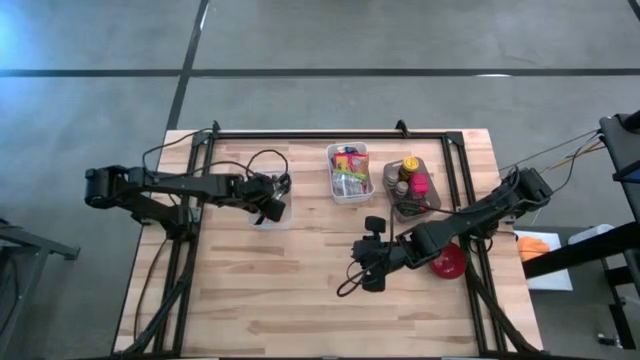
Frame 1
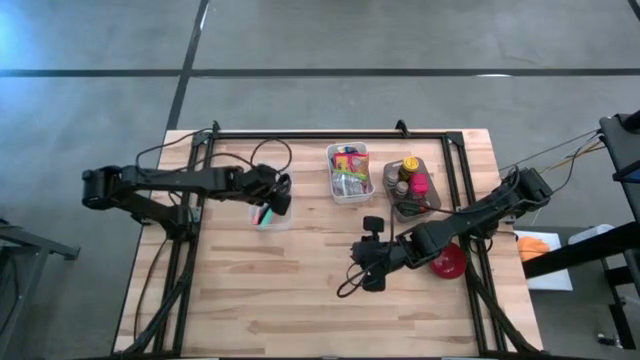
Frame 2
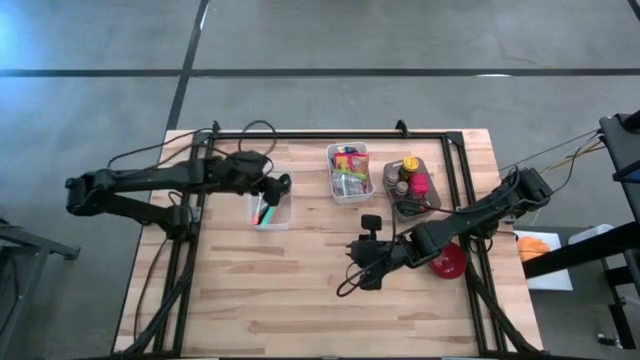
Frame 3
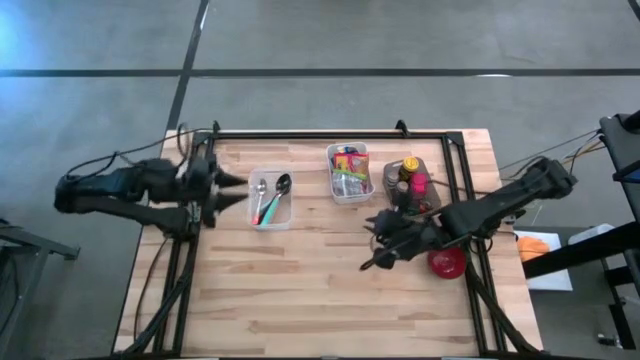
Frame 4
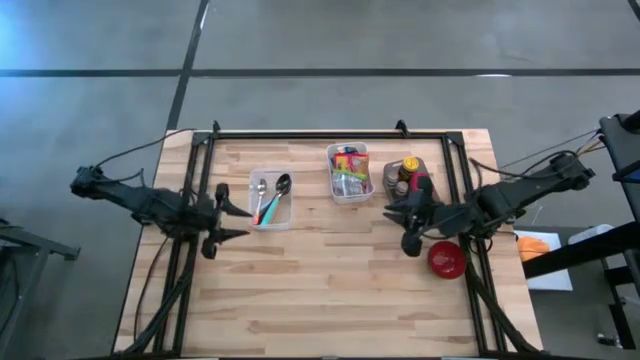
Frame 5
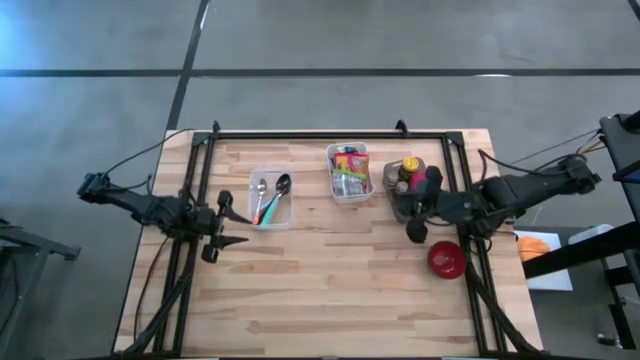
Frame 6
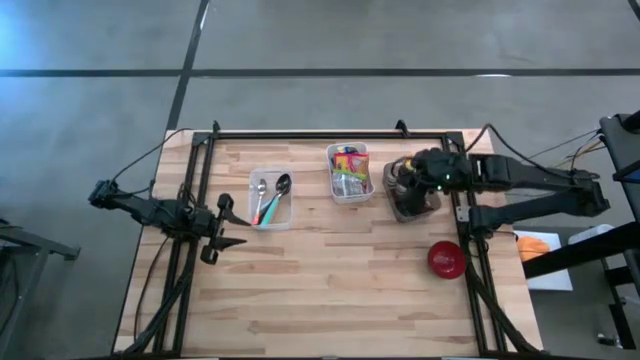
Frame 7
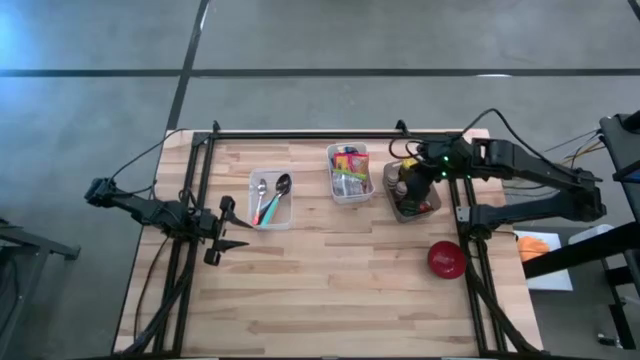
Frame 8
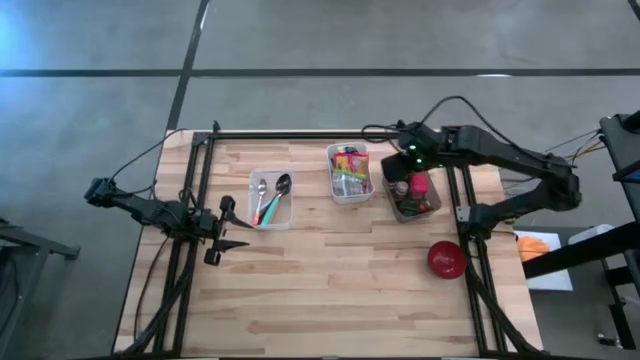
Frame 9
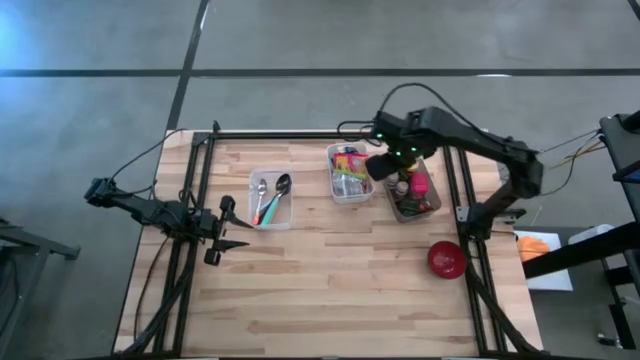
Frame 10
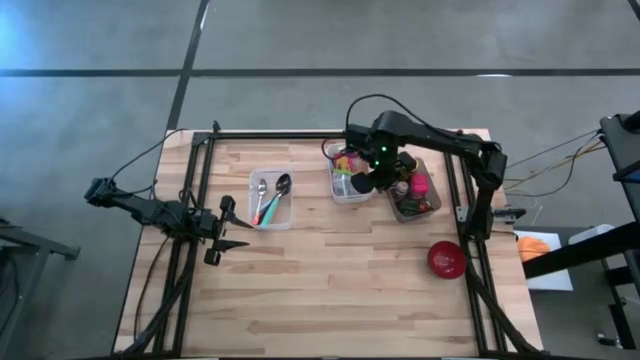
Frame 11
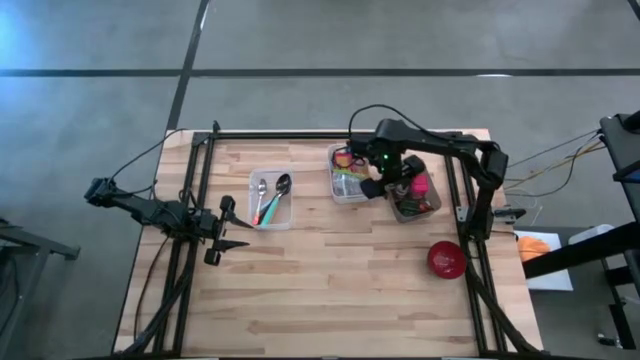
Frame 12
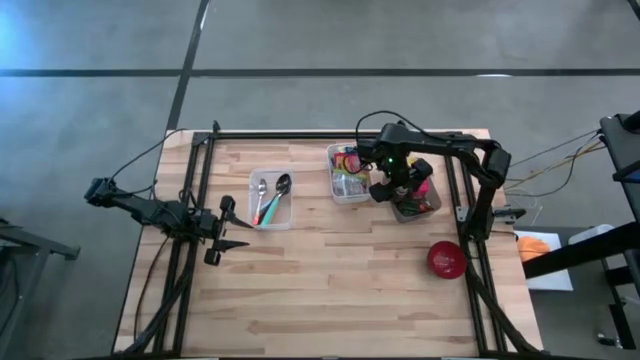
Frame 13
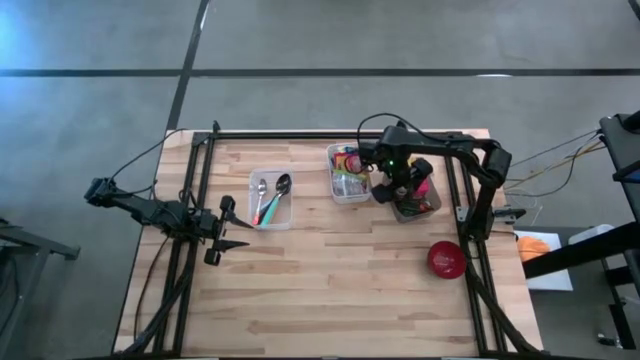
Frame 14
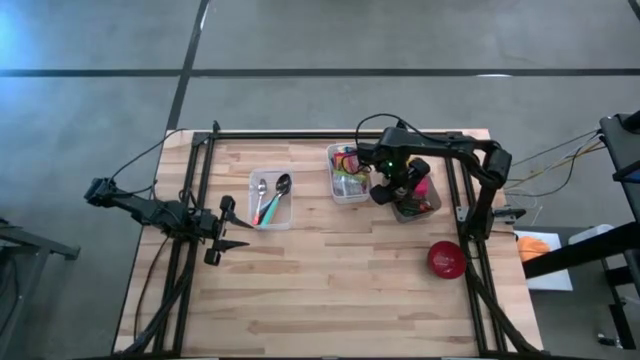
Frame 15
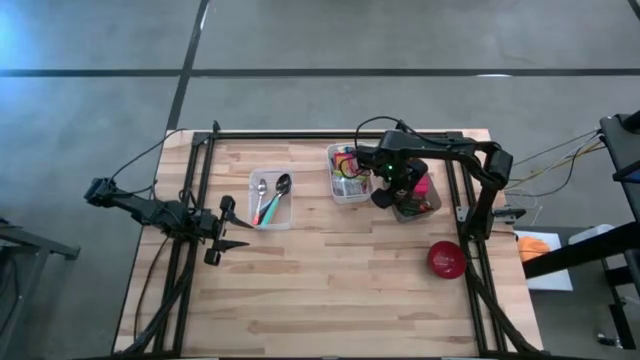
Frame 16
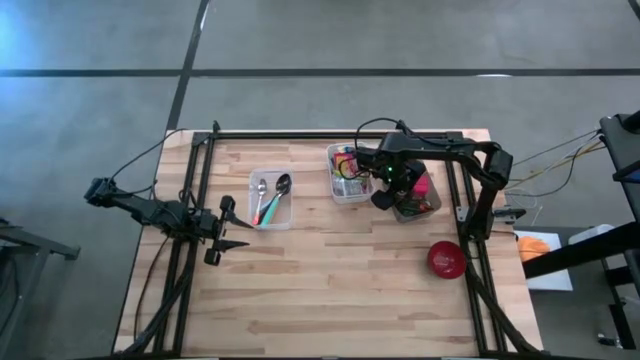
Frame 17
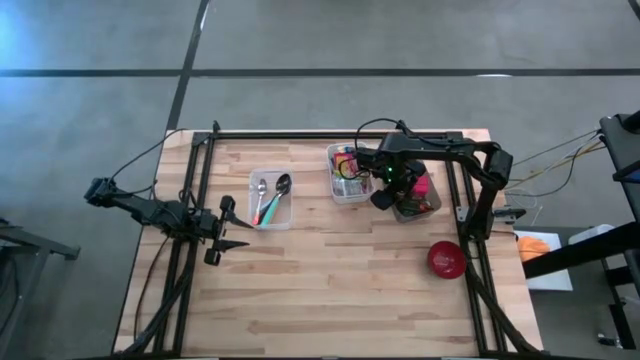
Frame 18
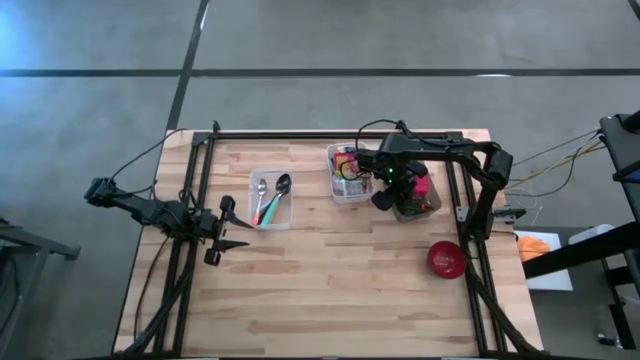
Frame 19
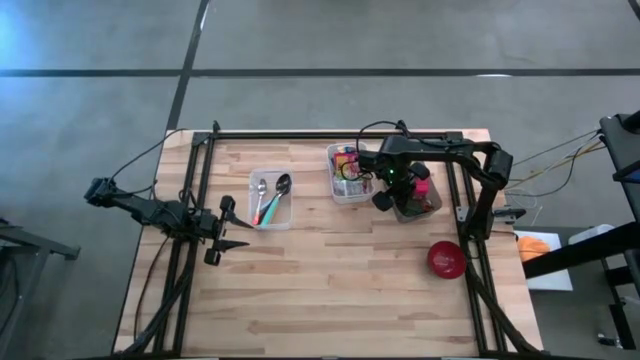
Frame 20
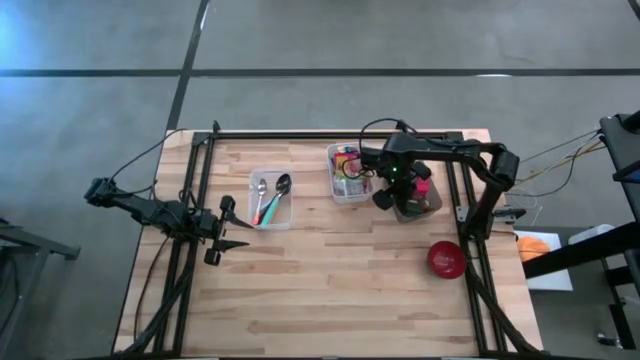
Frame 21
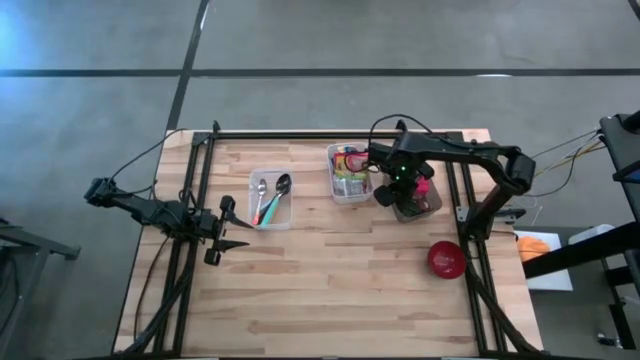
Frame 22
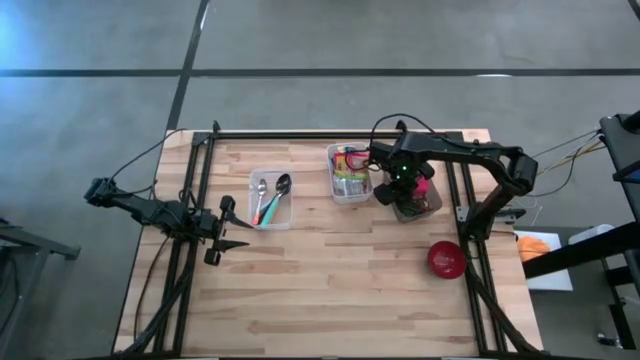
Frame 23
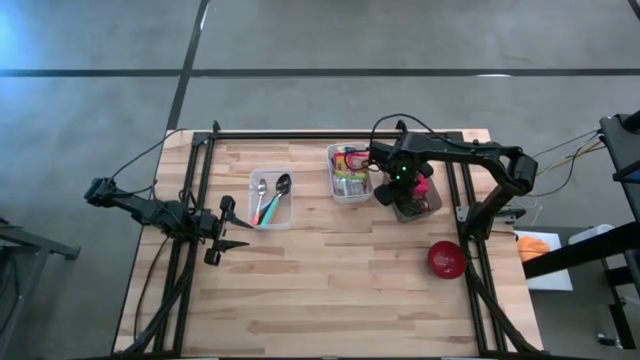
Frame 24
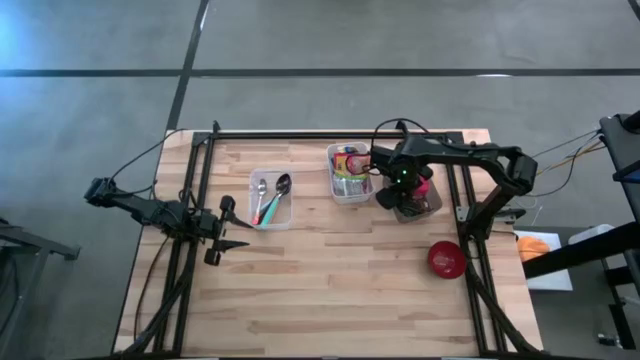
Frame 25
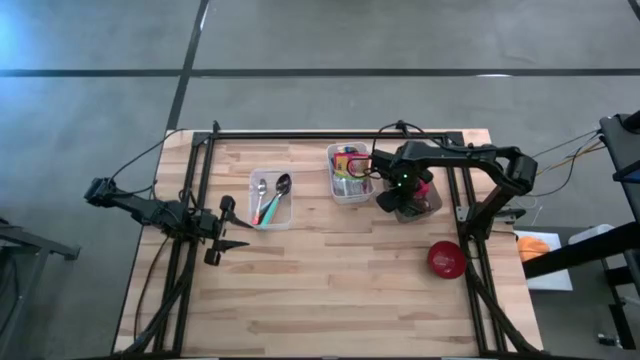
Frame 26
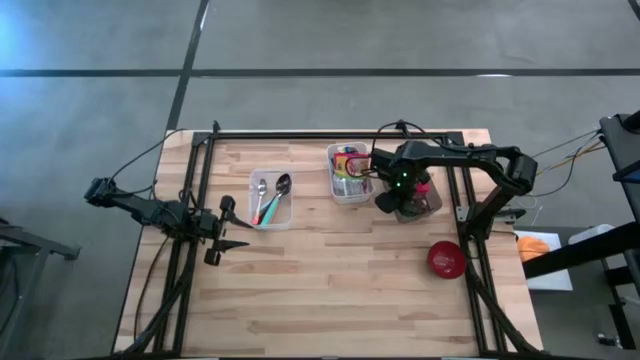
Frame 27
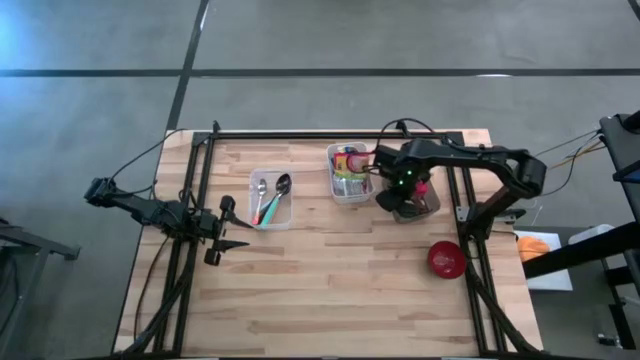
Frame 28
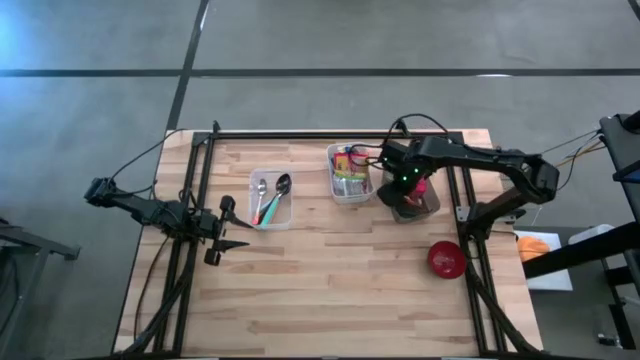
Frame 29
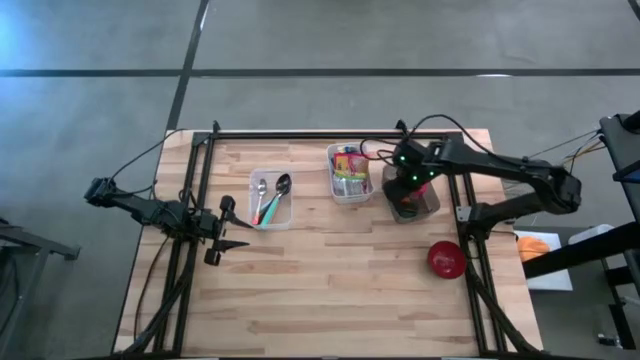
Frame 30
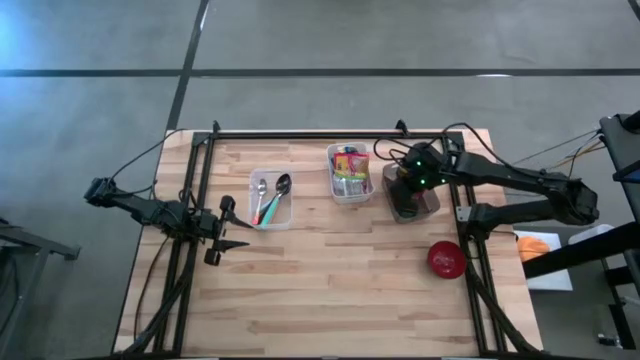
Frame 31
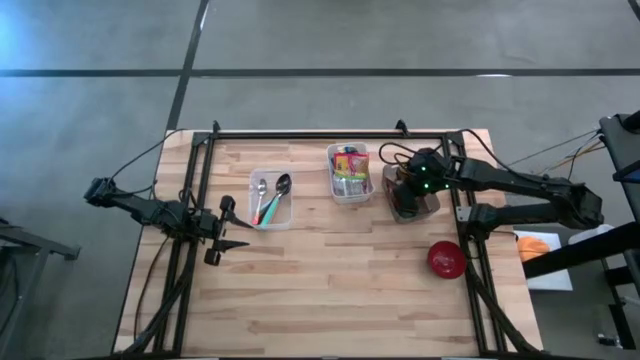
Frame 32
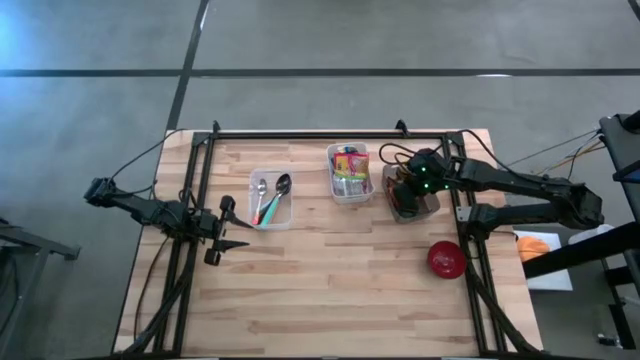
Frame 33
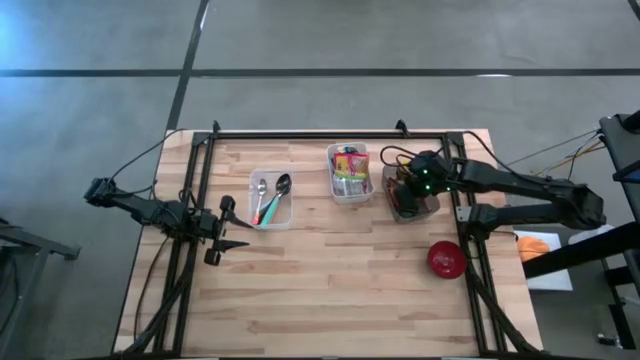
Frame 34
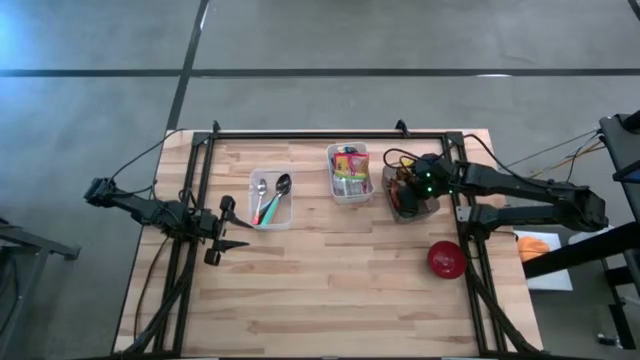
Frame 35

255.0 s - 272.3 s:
Adjust the brown seasoning pack in the black bin

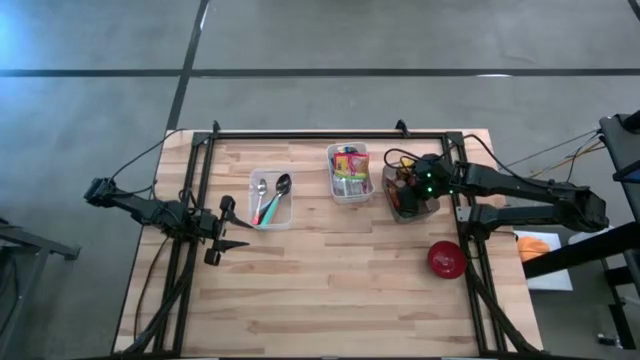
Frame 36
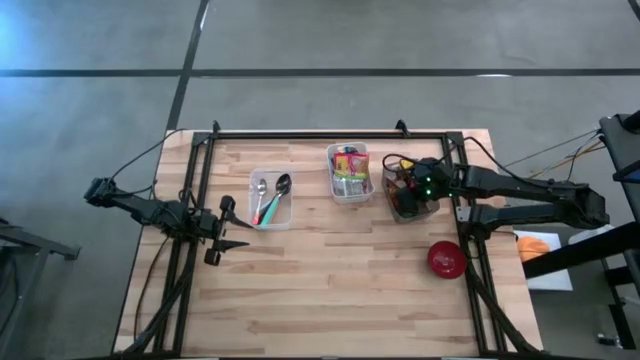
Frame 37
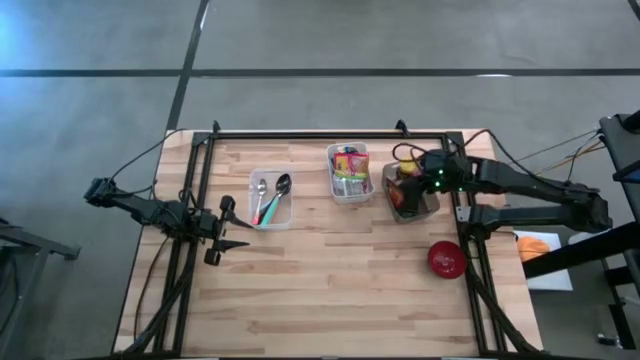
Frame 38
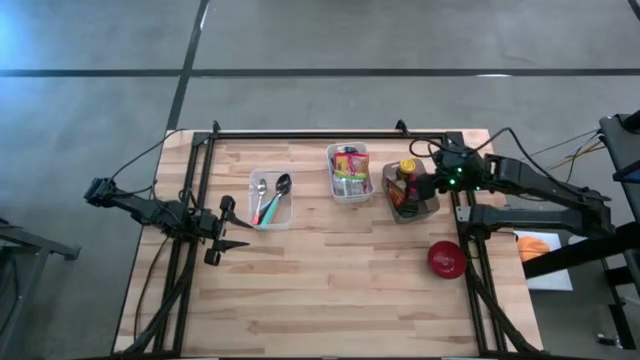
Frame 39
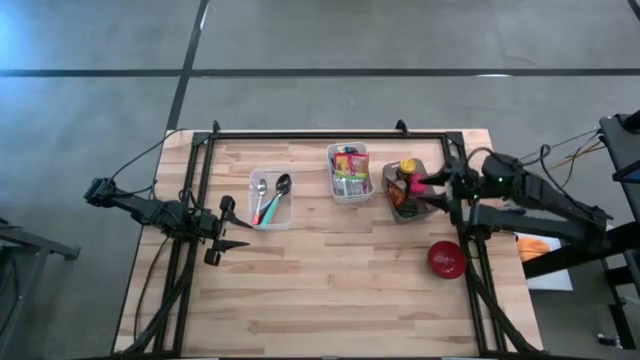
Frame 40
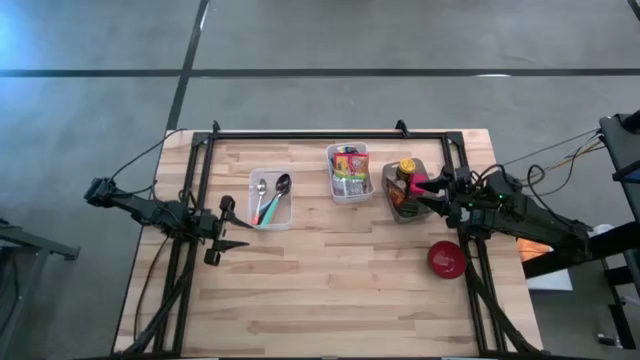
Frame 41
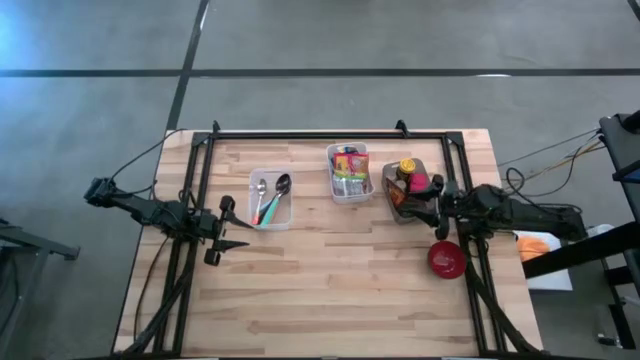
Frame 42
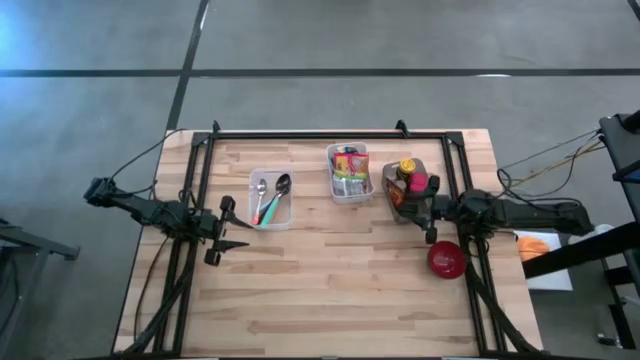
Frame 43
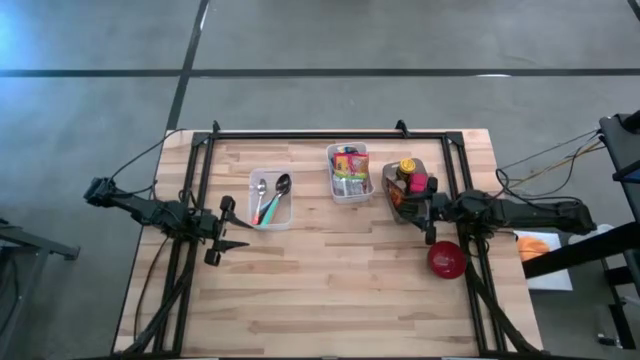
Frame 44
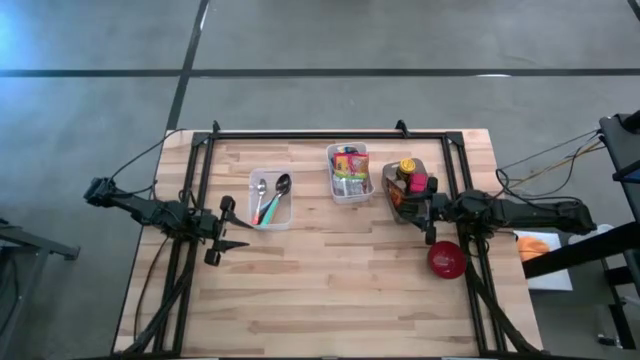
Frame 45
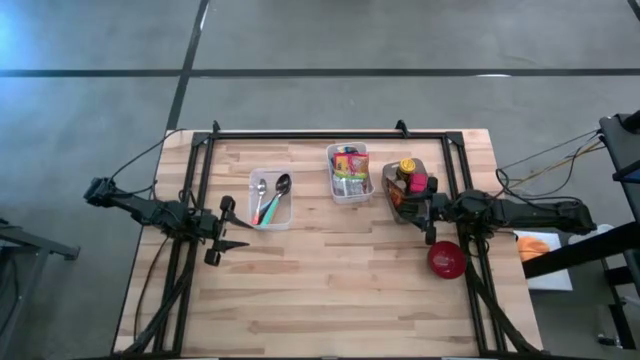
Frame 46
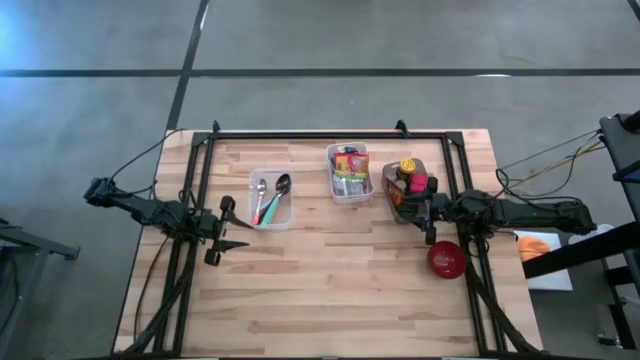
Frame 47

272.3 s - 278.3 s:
Return to Home Position
